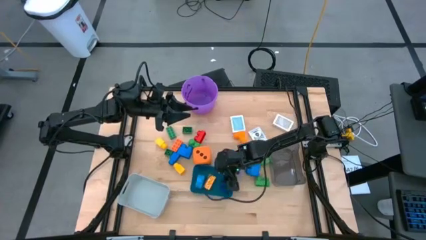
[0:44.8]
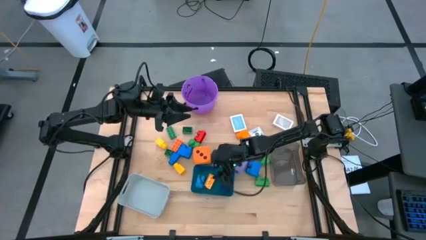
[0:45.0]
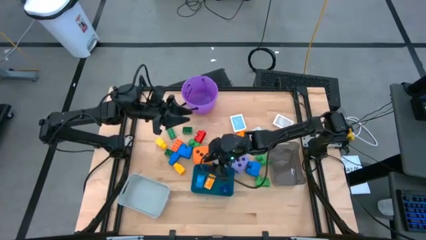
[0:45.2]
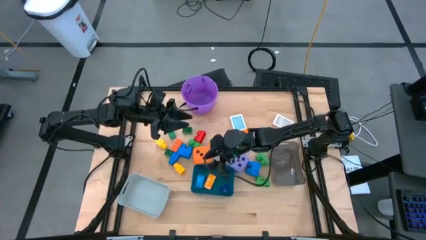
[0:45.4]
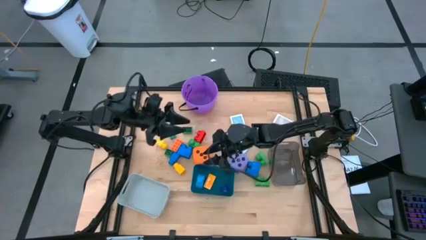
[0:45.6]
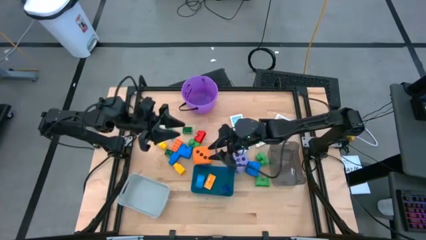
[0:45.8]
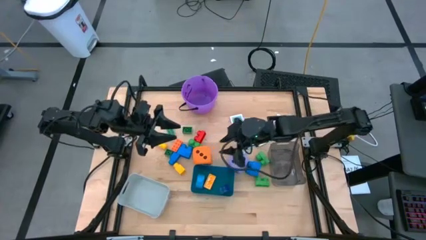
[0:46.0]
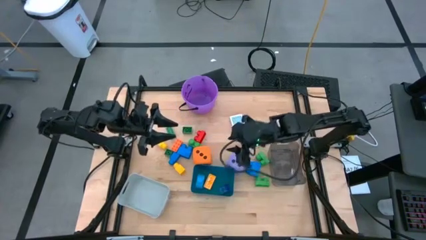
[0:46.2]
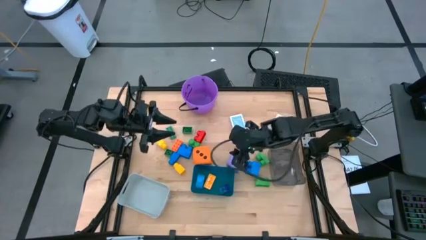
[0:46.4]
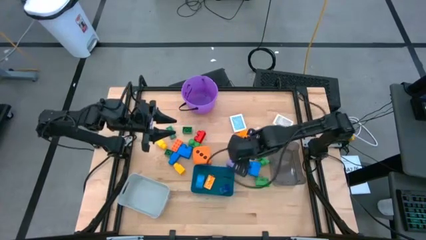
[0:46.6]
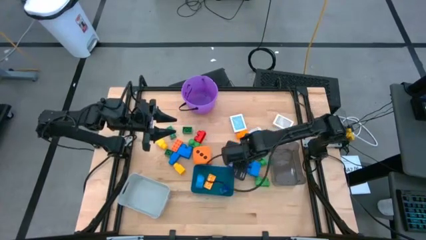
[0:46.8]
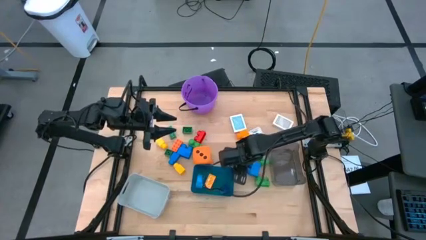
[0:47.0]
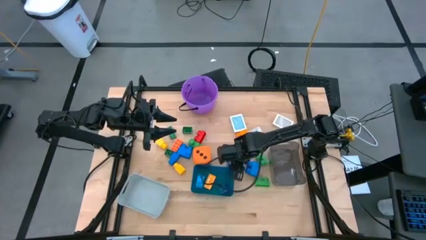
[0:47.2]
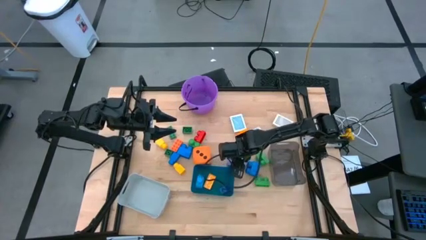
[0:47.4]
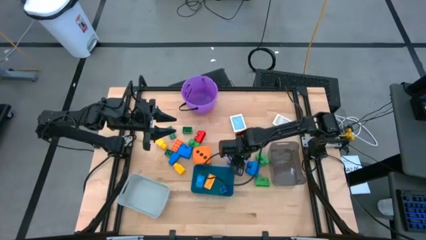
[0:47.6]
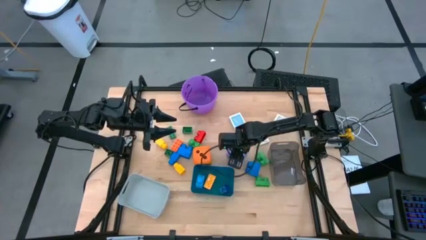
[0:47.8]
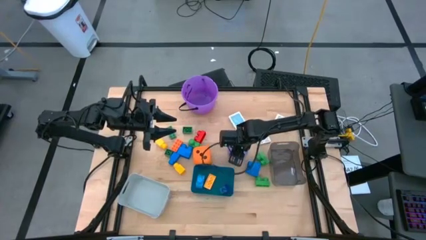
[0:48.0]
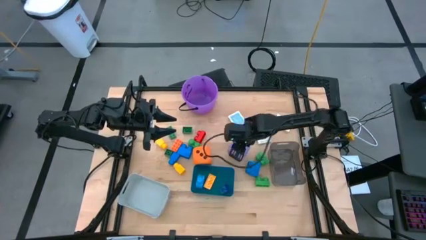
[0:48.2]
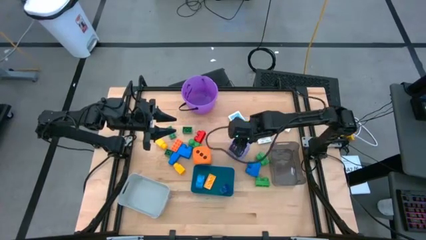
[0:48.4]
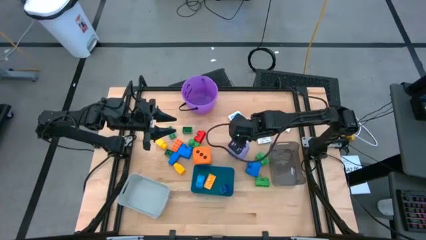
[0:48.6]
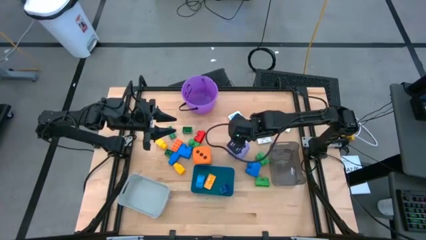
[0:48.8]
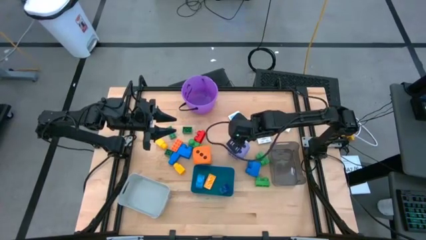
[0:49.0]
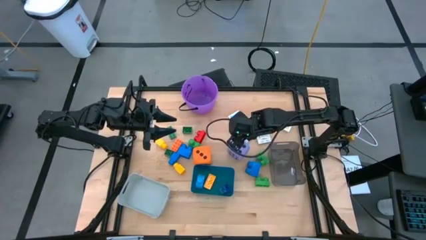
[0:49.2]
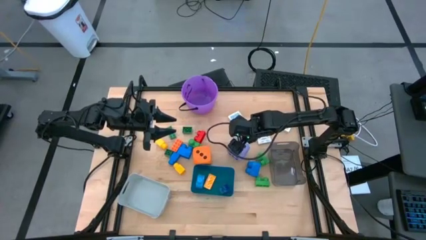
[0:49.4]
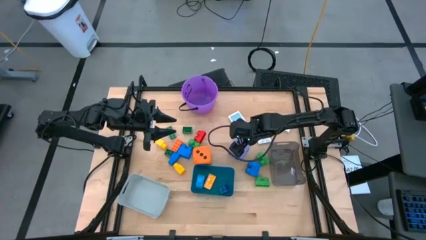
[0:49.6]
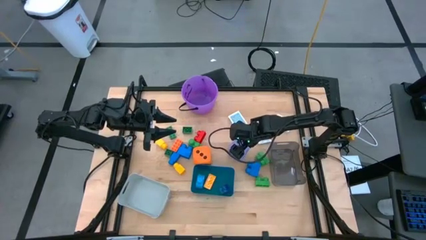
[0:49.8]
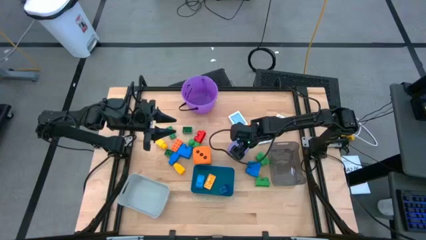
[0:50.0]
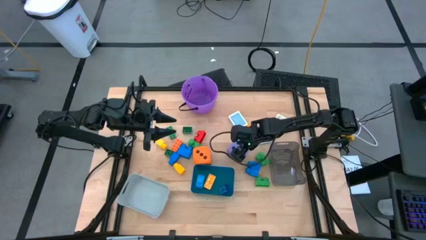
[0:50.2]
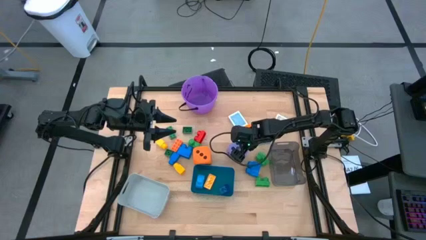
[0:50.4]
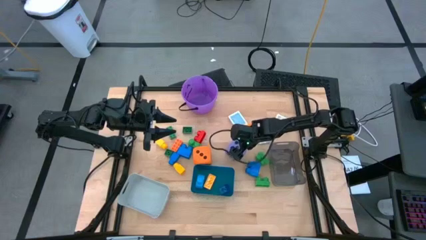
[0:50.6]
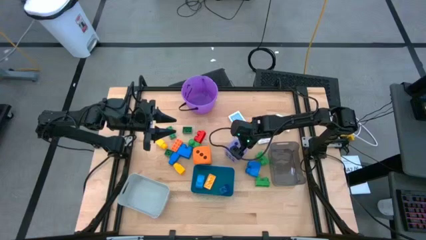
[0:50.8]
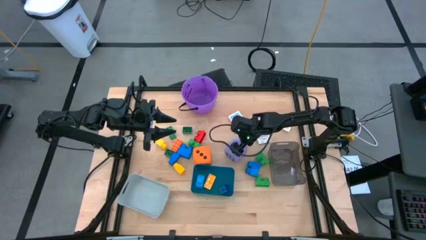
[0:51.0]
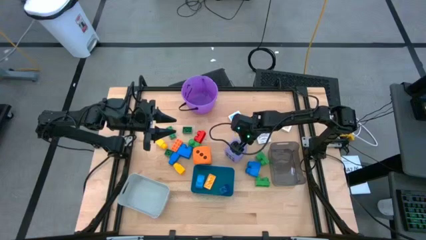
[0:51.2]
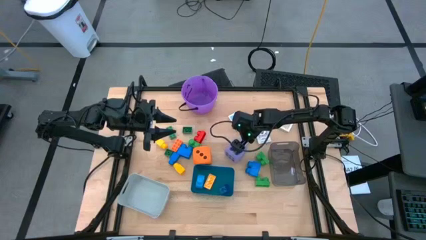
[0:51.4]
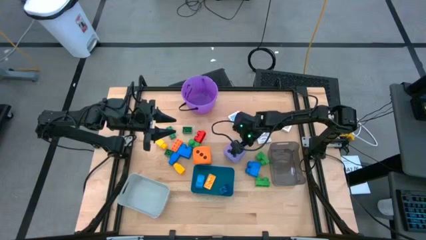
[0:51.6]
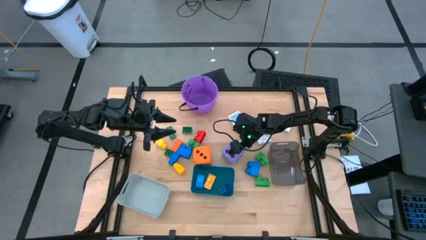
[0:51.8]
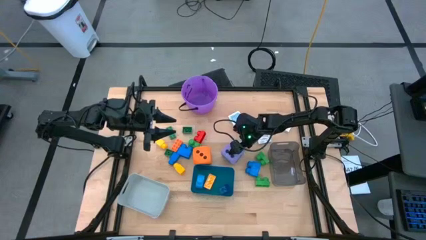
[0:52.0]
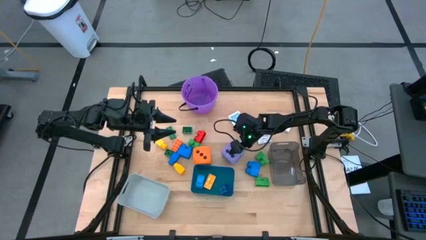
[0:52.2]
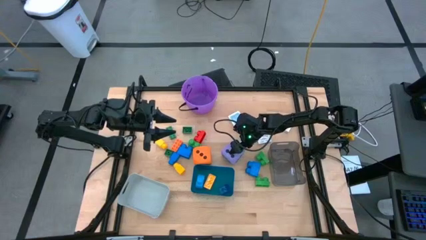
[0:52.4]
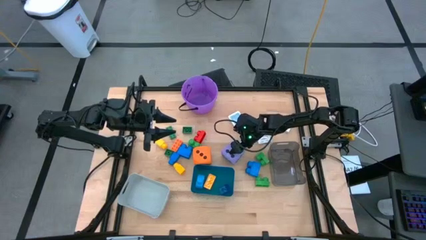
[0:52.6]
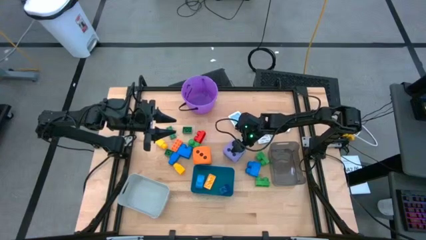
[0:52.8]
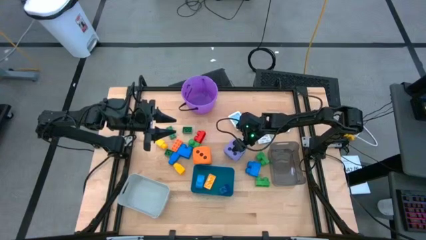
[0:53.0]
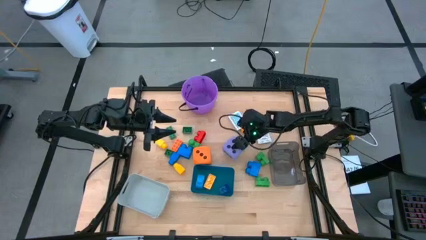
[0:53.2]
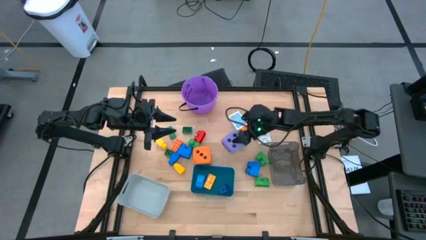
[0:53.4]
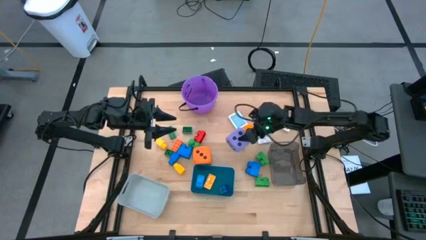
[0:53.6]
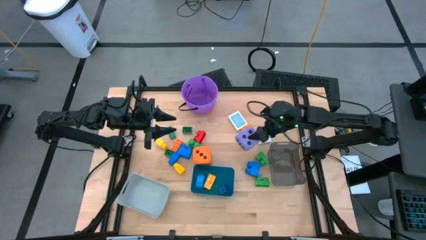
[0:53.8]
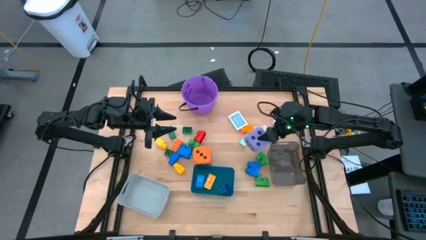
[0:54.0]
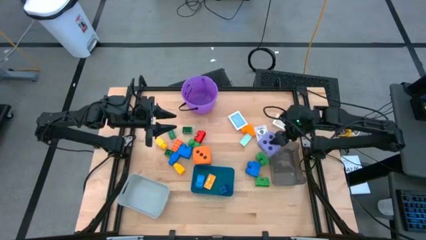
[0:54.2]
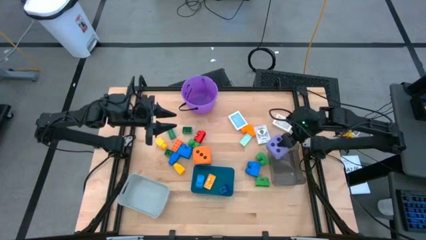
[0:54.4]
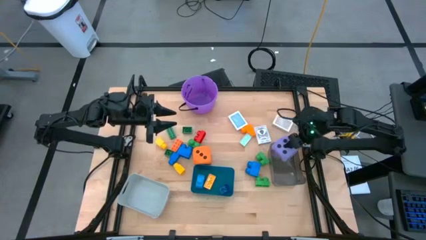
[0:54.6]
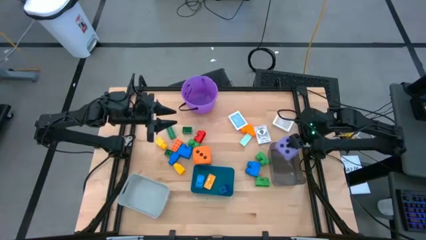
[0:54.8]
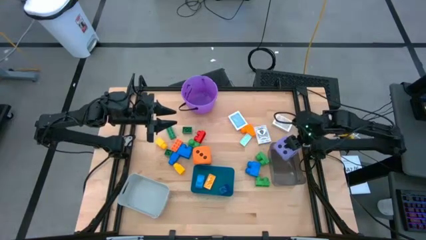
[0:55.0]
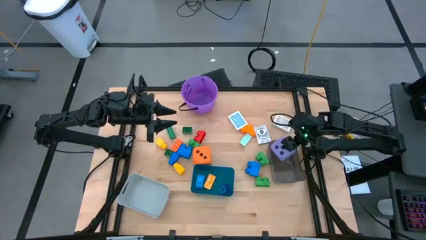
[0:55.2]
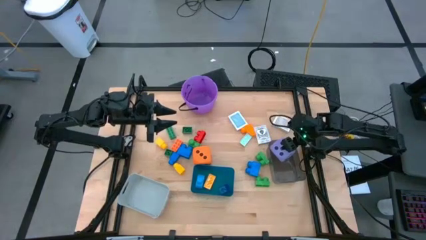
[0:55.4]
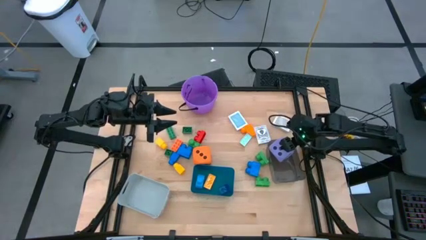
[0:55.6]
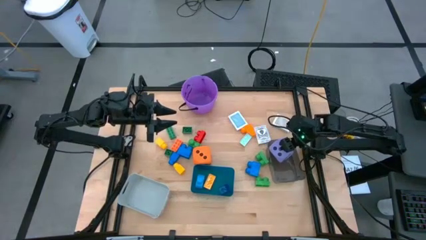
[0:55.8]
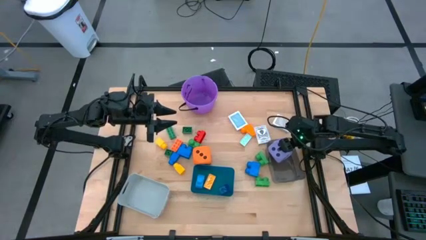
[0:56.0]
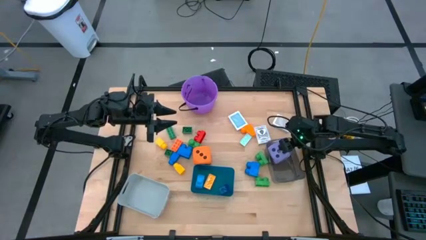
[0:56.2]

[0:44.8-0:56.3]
Task: Pick & Place Toys
Put the purple dice into the black bin
